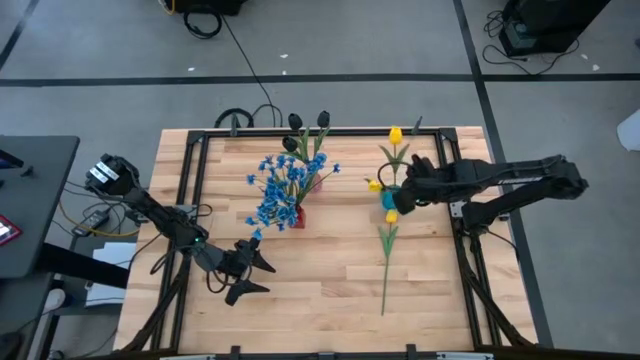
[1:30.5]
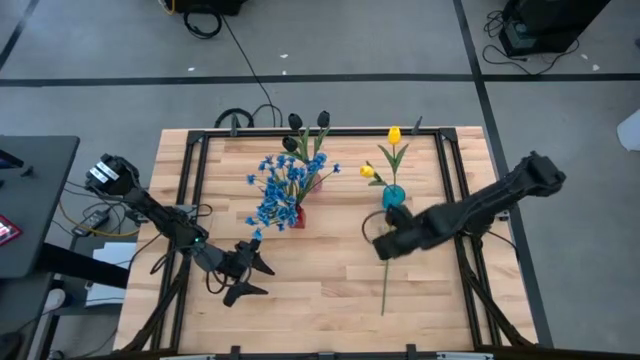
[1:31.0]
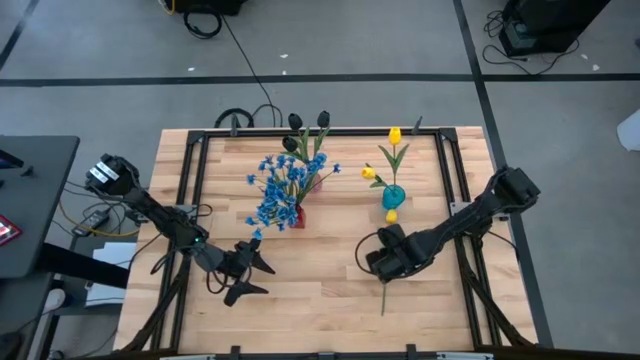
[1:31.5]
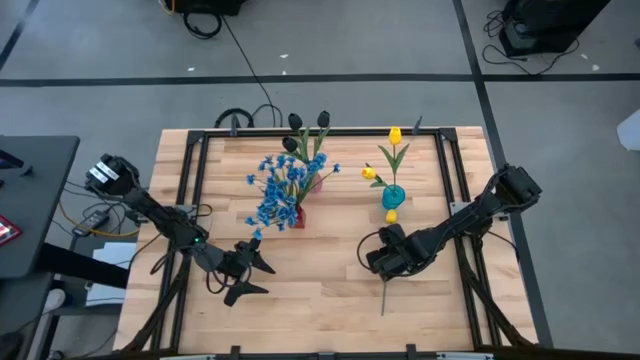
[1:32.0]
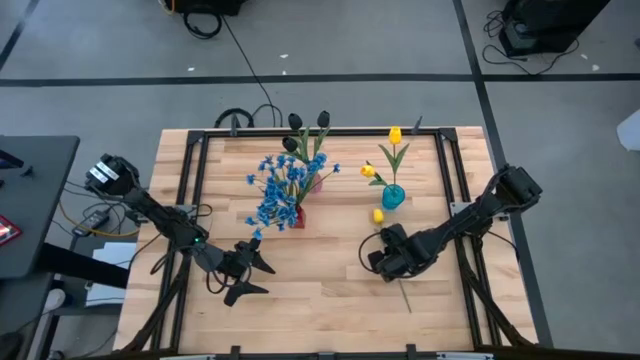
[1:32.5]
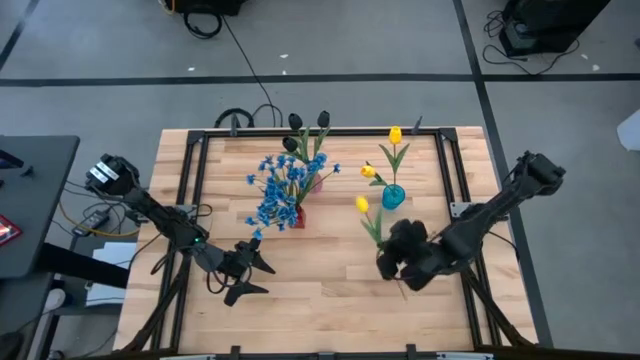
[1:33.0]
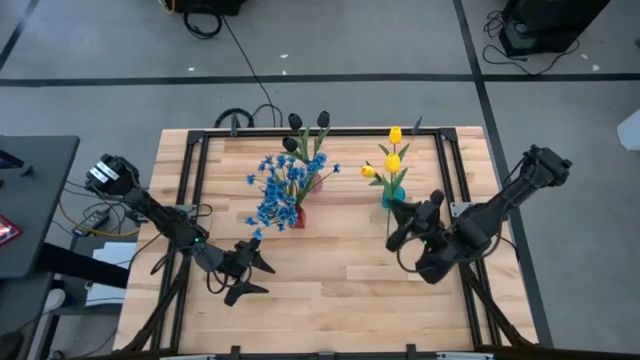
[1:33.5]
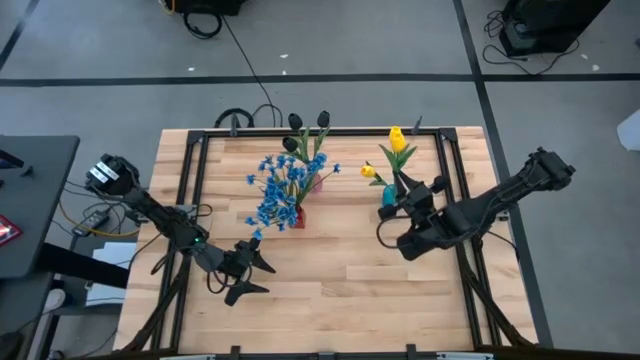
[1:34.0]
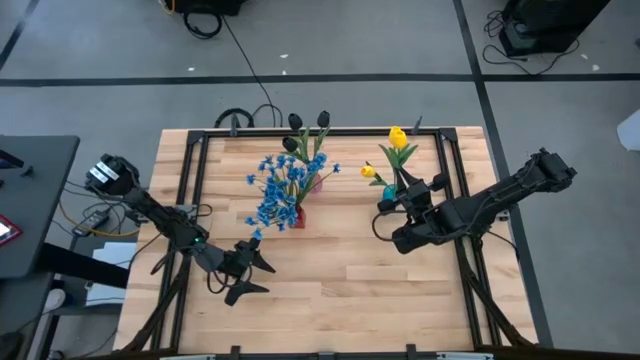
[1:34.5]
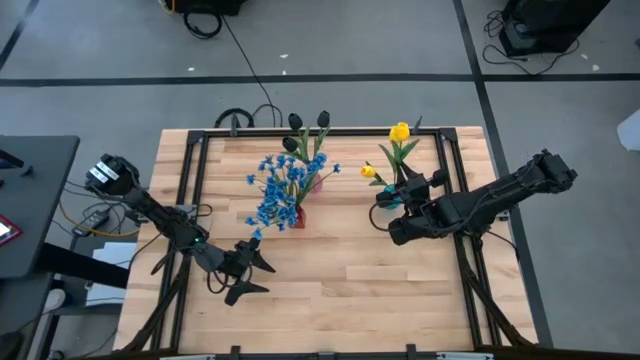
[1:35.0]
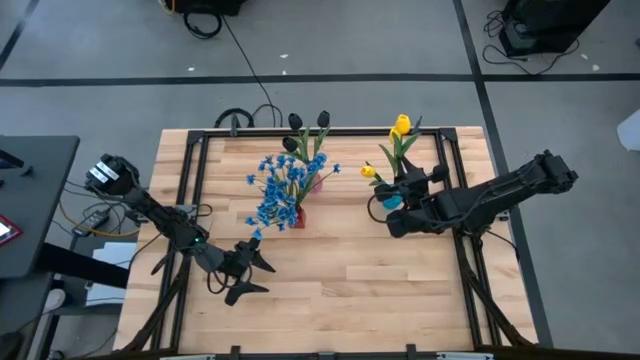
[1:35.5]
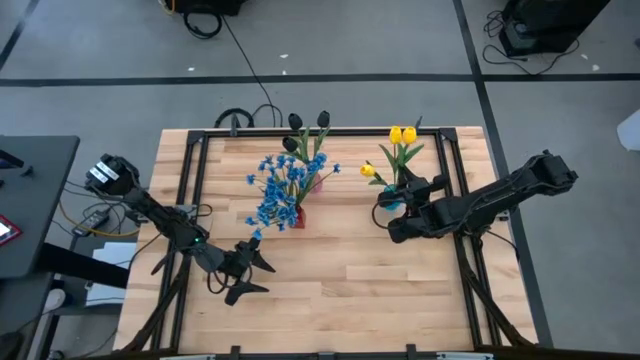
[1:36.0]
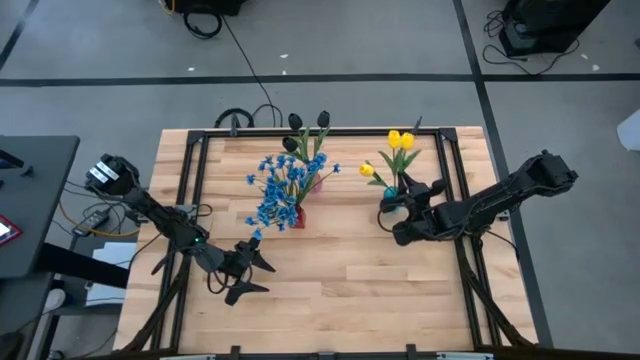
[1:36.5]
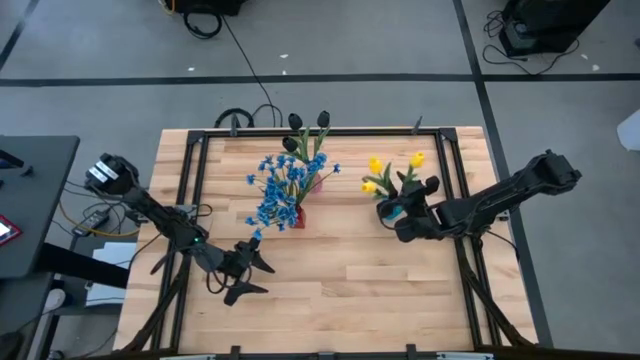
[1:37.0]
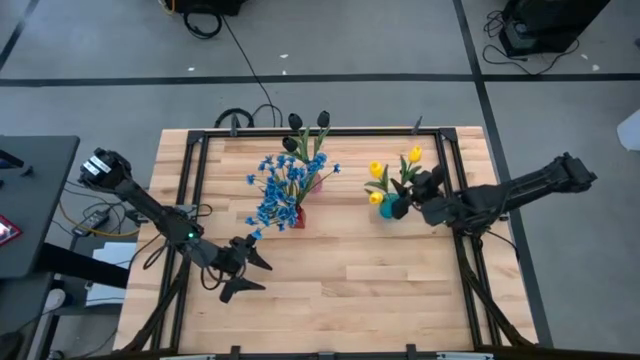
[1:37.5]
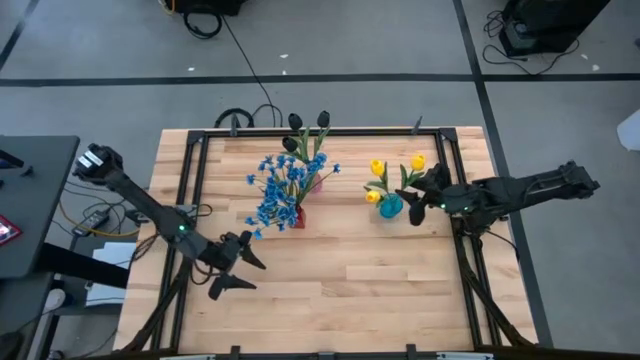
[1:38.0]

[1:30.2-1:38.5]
Task: Sort flowers into vase by color
Put the yellow tulip into the blue vase

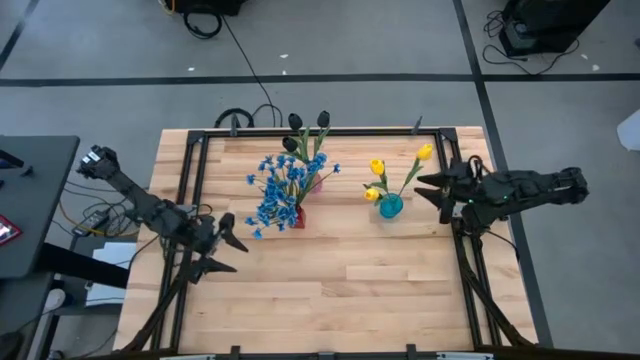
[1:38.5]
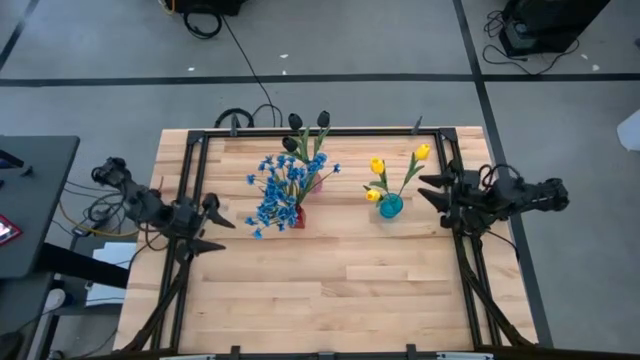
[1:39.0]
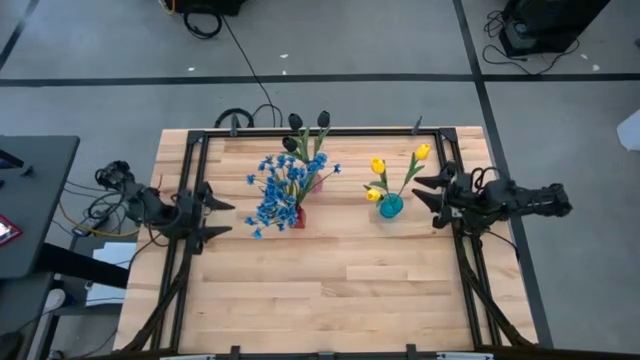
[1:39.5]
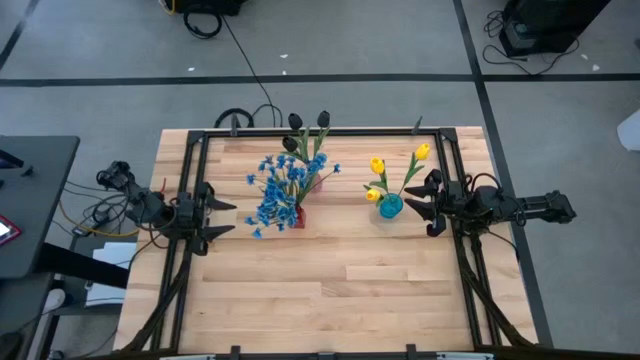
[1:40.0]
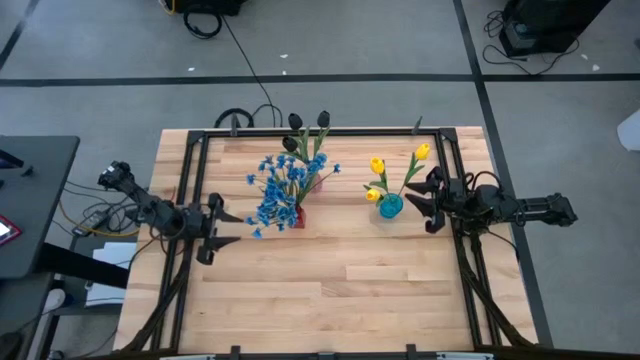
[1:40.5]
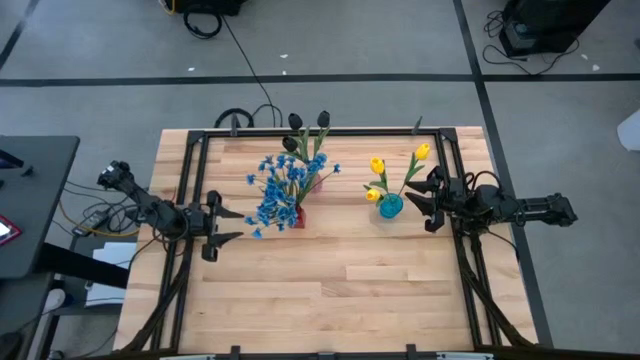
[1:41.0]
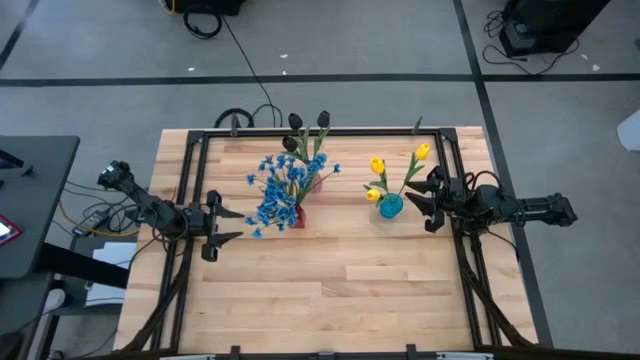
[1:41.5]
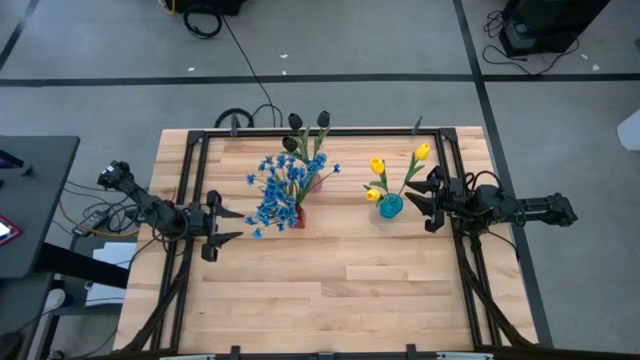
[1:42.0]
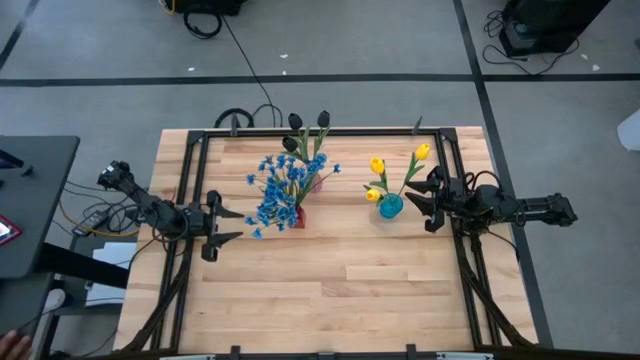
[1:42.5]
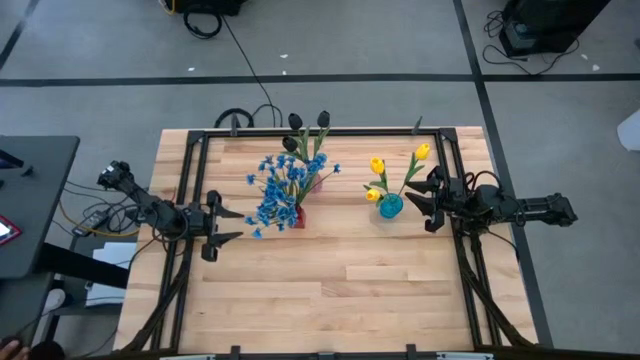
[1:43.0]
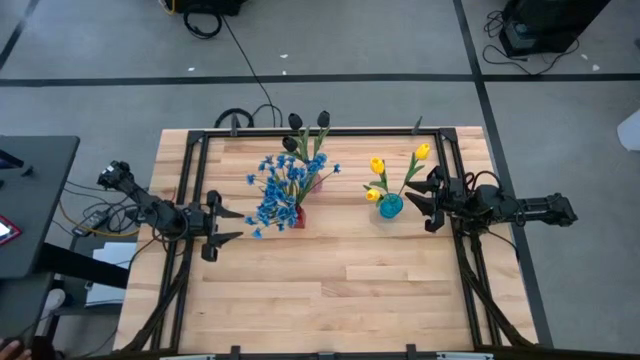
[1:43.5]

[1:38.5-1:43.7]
Return to Home Position

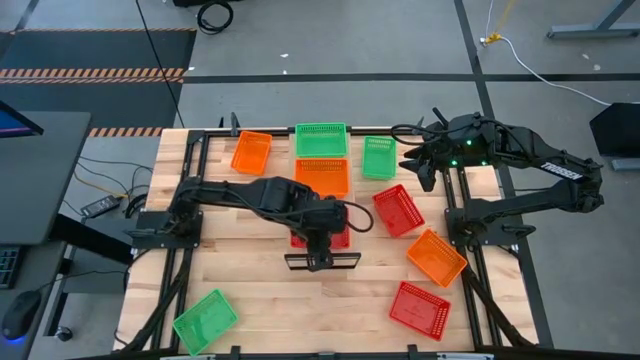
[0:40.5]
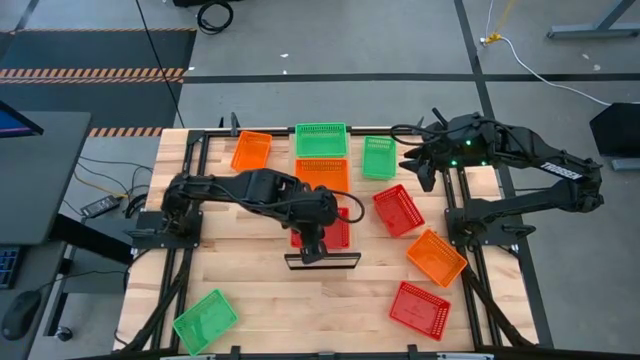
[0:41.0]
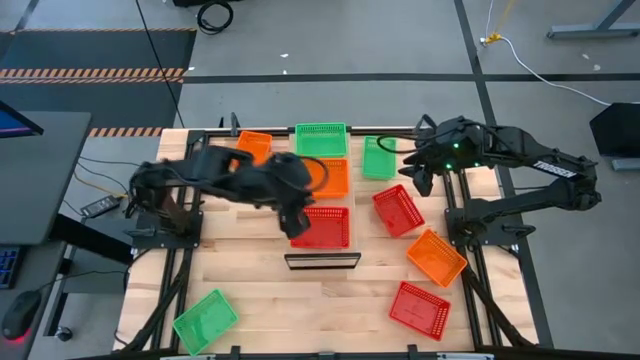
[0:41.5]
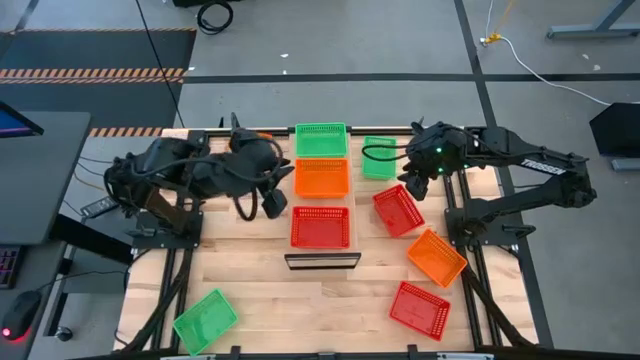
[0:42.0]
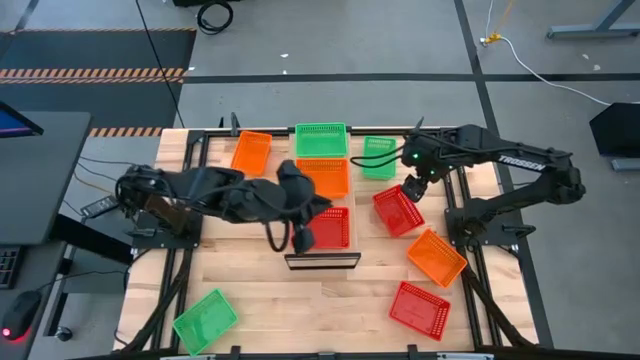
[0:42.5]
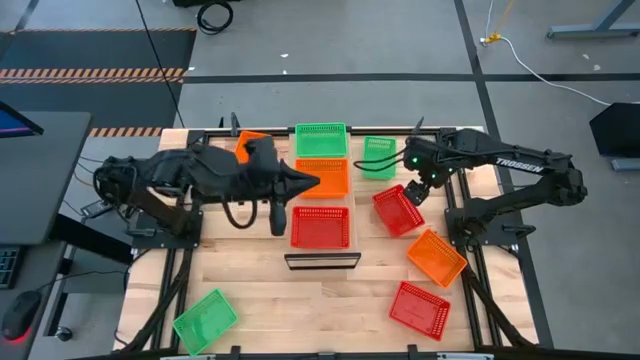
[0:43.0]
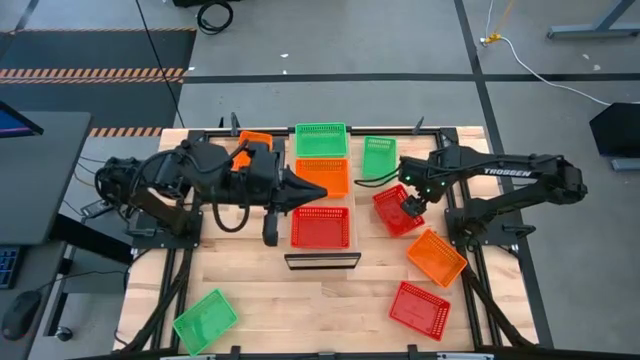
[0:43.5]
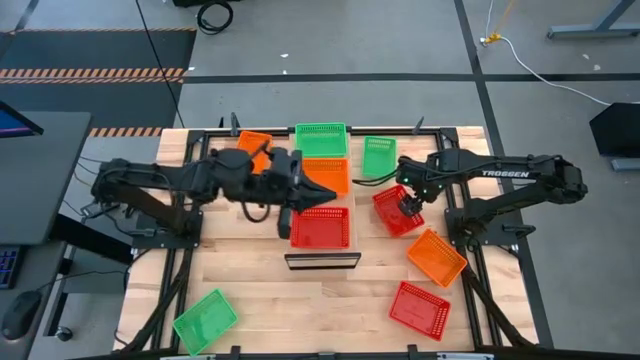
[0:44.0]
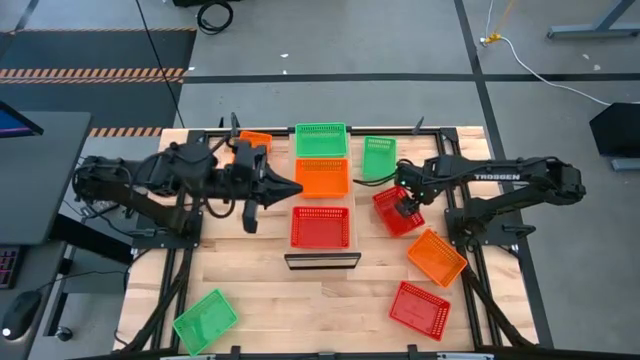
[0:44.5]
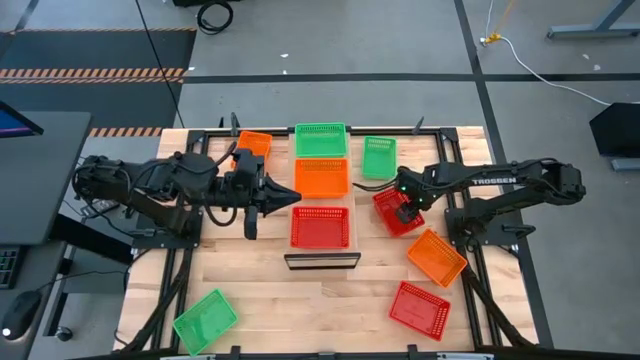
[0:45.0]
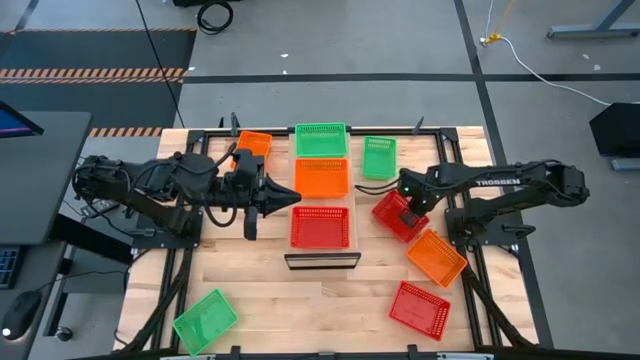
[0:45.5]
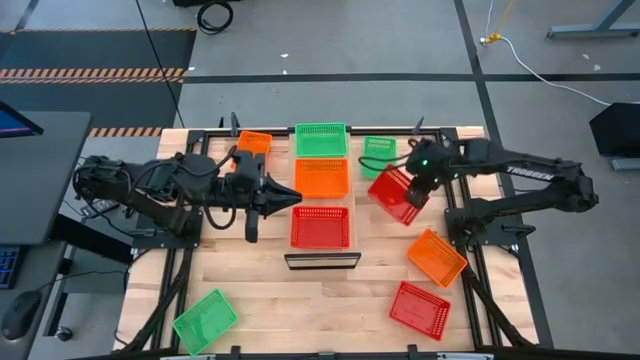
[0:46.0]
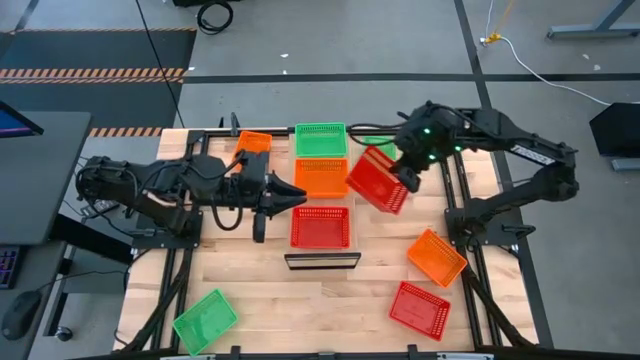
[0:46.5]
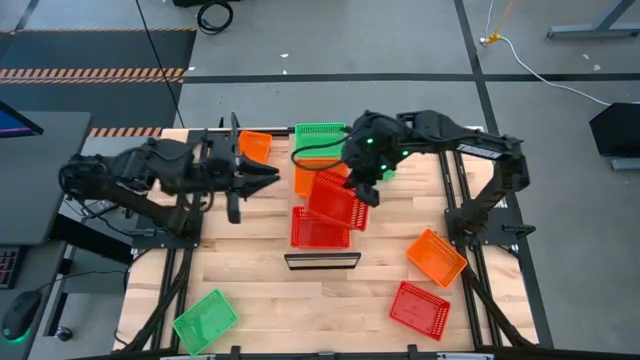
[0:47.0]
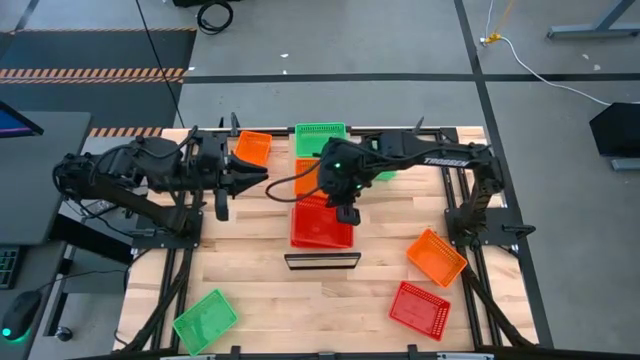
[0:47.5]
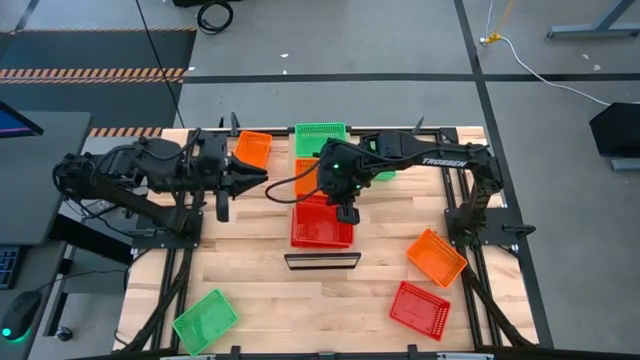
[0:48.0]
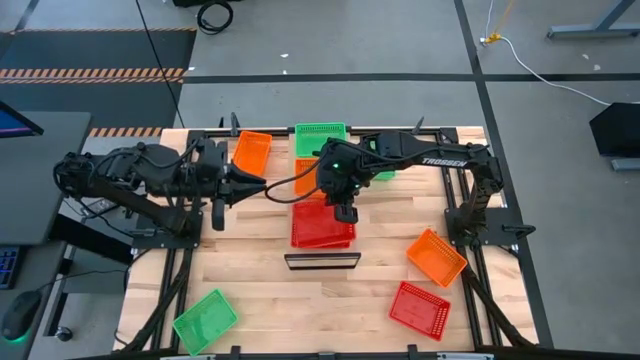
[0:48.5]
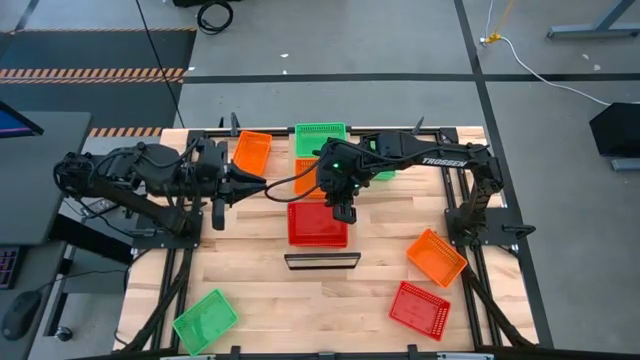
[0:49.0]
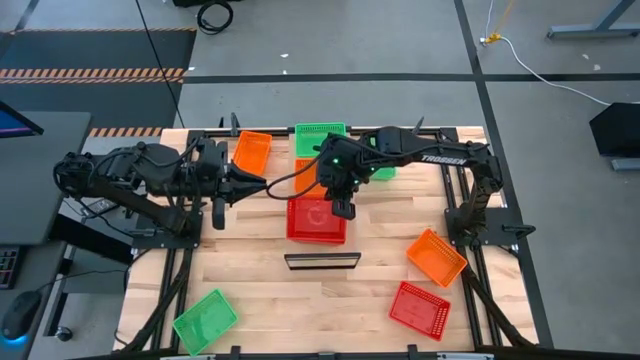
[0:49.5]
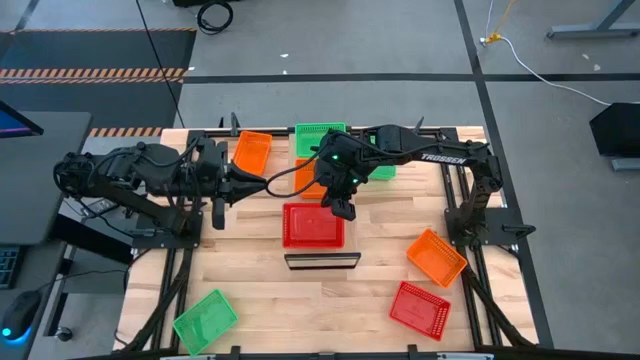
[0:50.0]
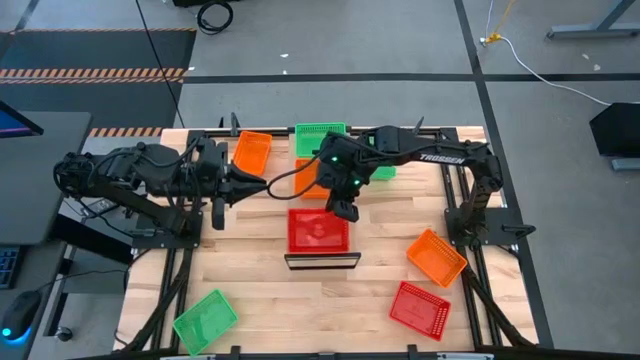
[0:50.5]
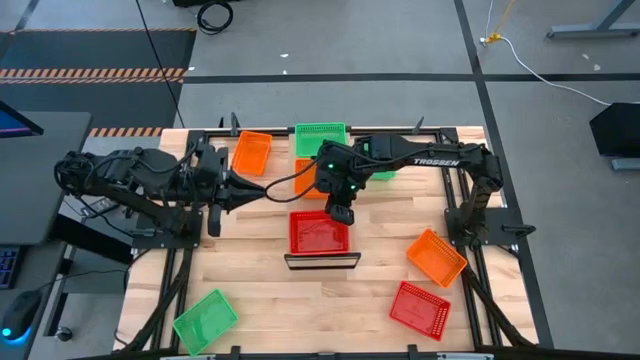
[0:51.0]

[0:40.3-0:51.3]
Task: Stack baskets on shelf by color
Stack the top red bin on top of the red bin on the shelf
